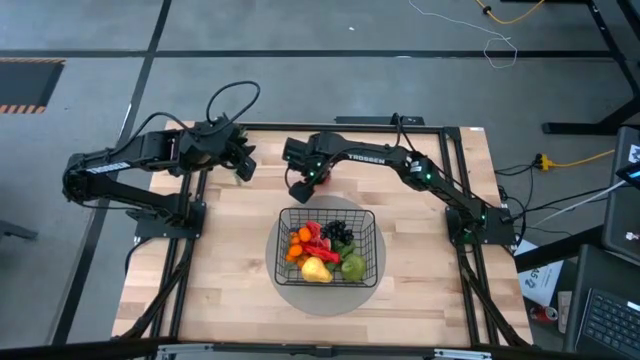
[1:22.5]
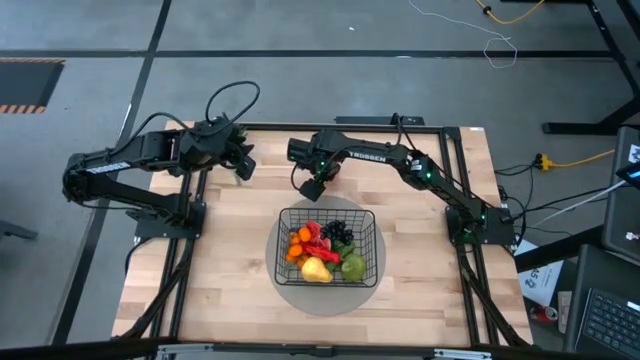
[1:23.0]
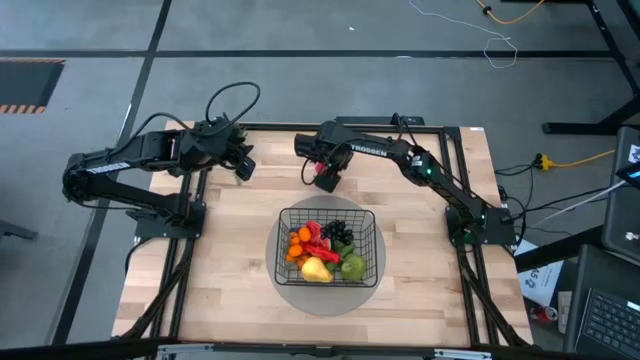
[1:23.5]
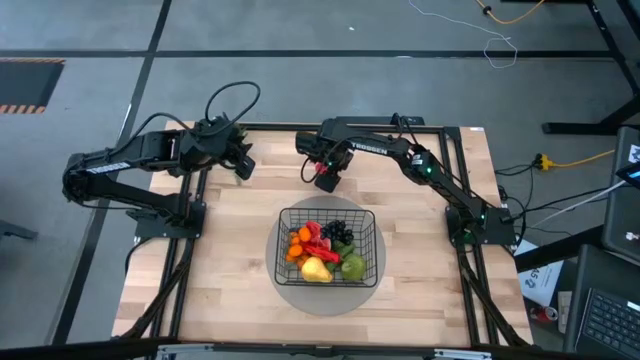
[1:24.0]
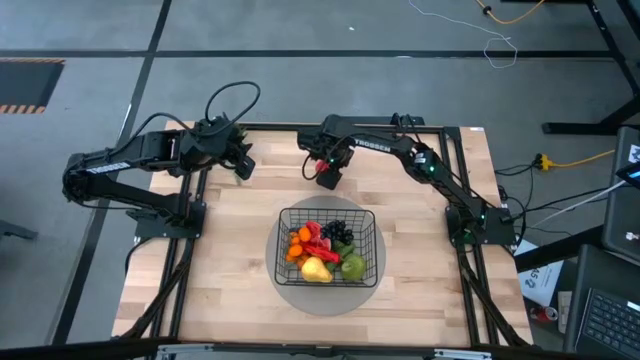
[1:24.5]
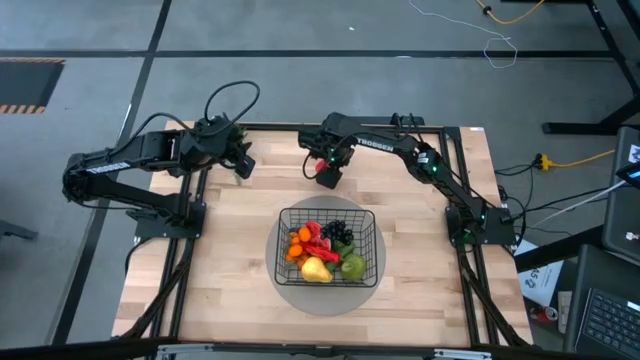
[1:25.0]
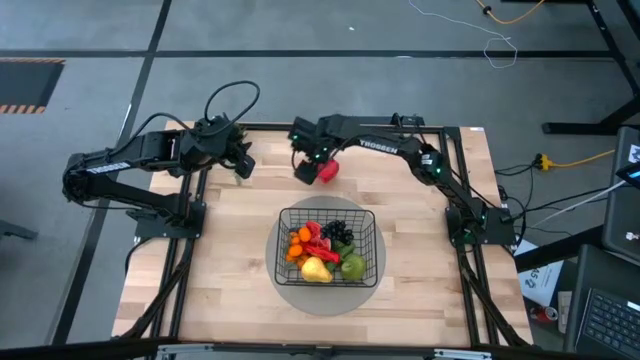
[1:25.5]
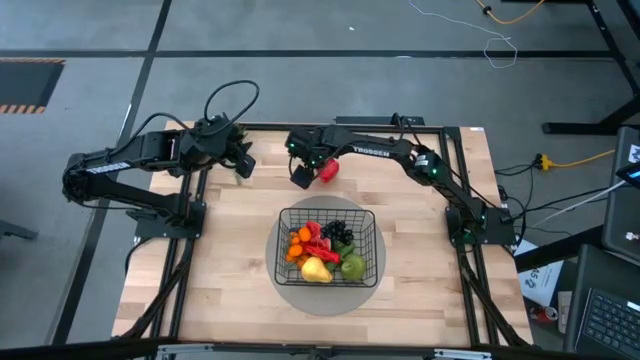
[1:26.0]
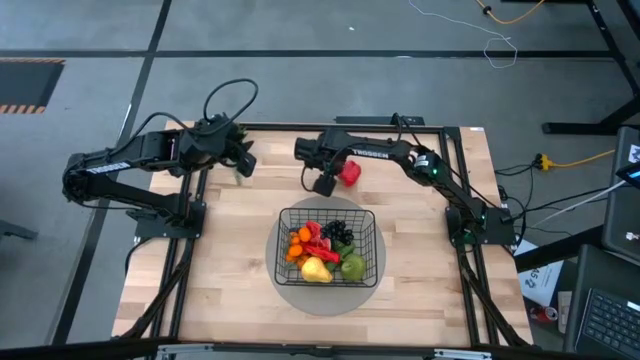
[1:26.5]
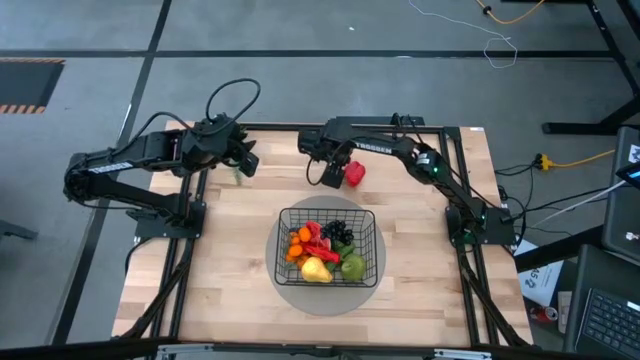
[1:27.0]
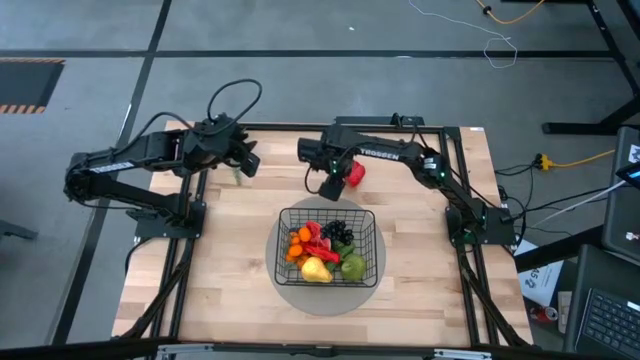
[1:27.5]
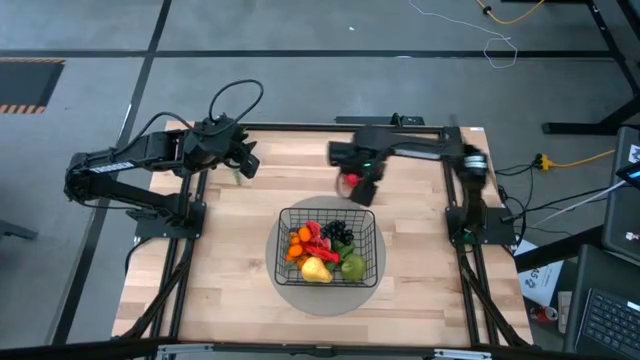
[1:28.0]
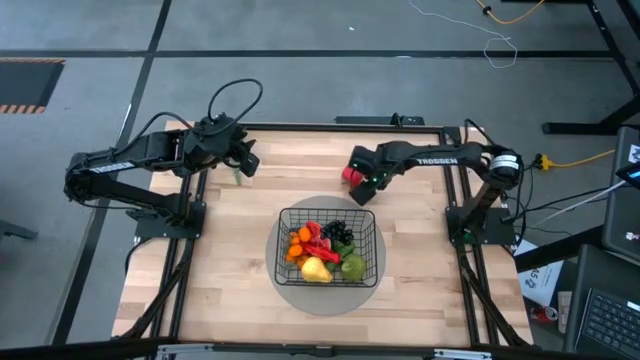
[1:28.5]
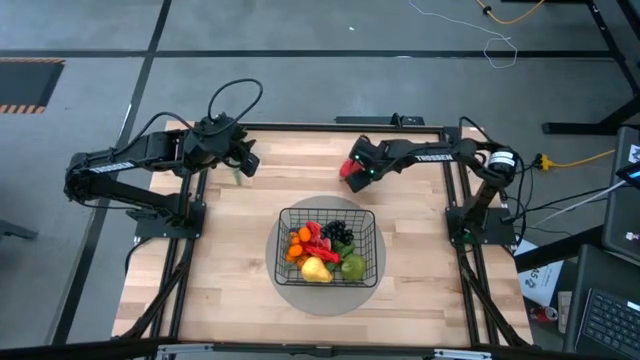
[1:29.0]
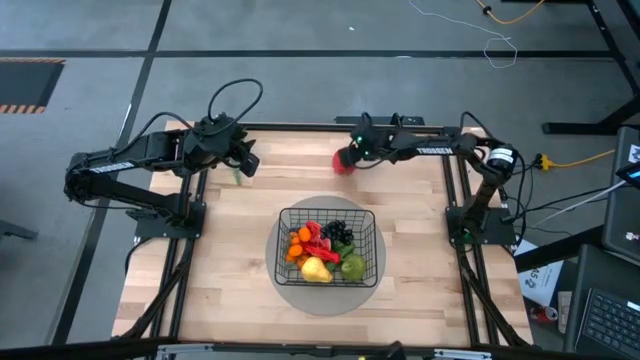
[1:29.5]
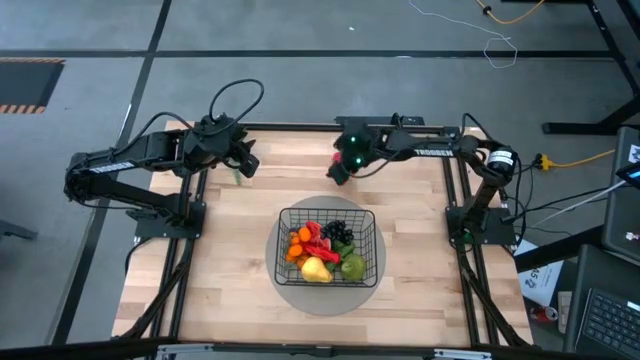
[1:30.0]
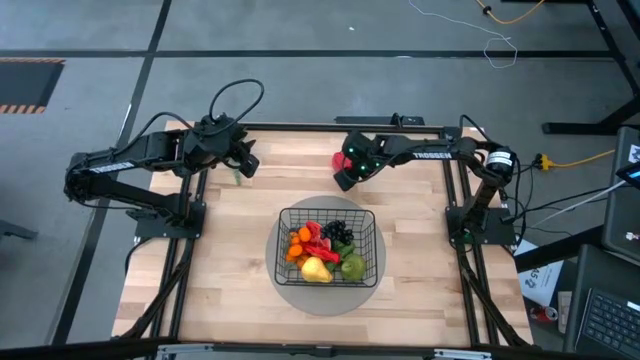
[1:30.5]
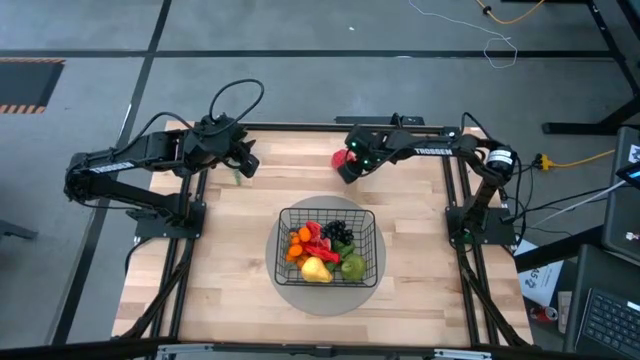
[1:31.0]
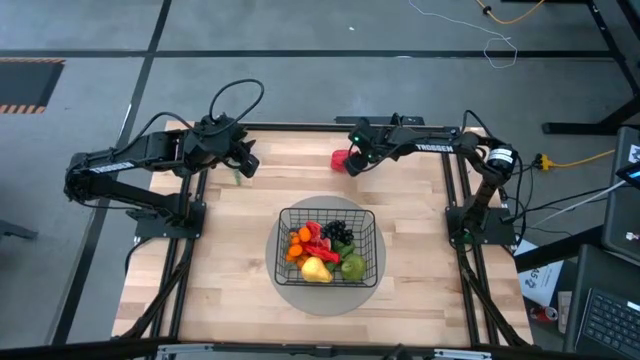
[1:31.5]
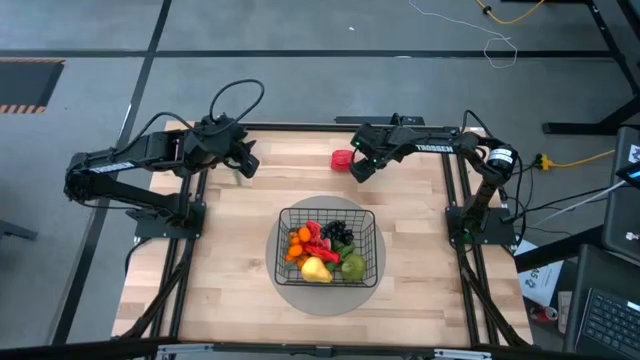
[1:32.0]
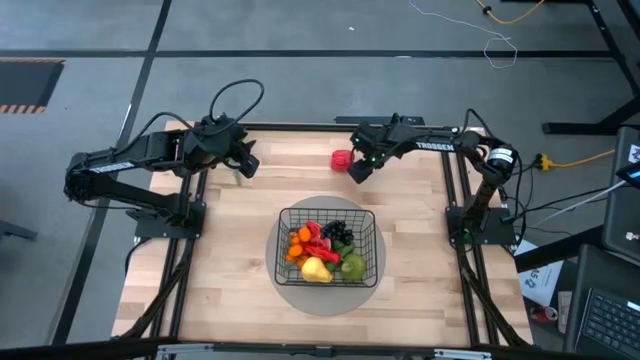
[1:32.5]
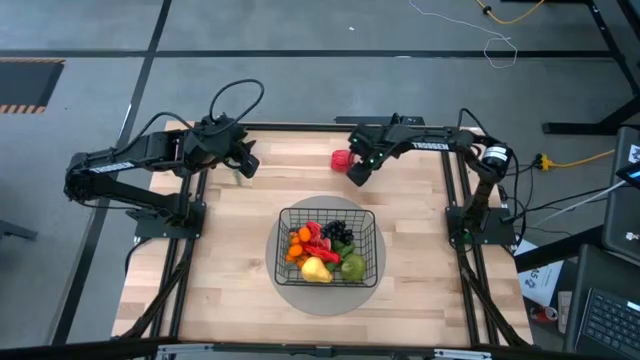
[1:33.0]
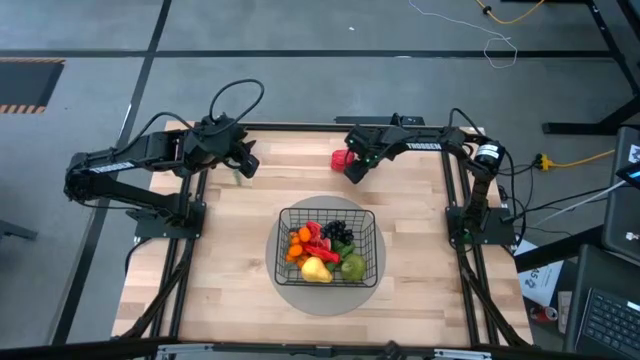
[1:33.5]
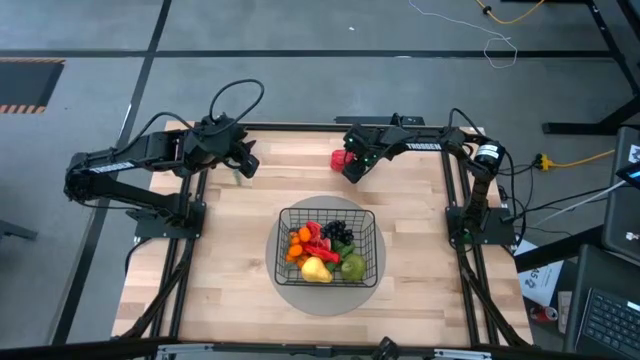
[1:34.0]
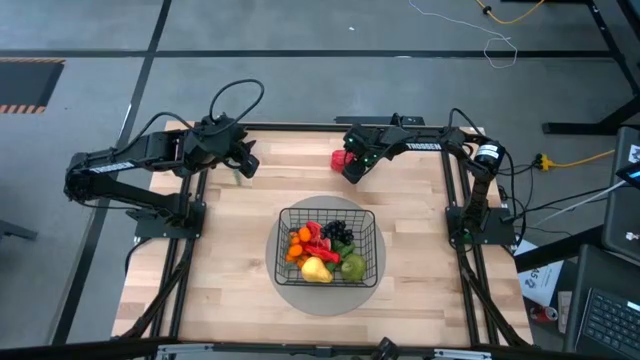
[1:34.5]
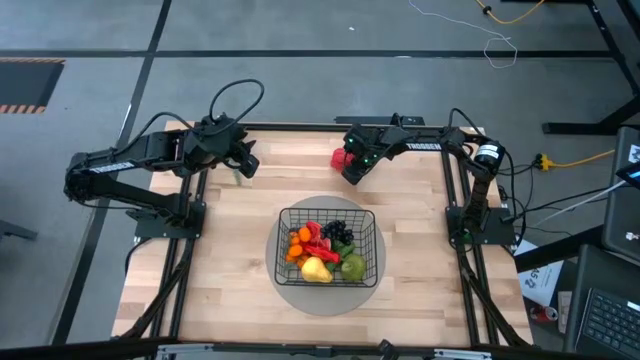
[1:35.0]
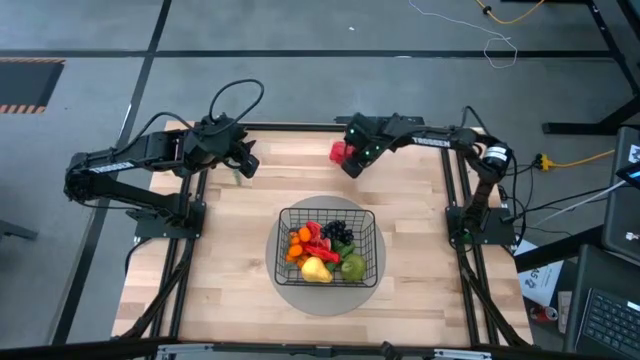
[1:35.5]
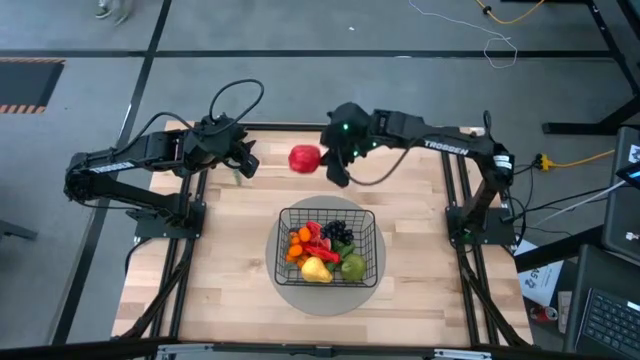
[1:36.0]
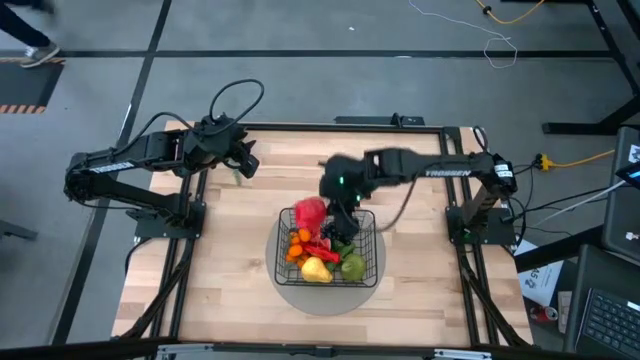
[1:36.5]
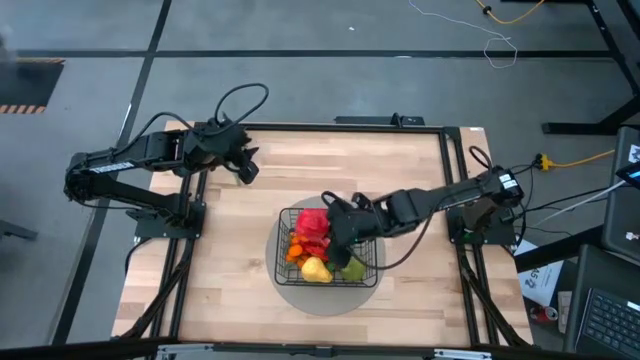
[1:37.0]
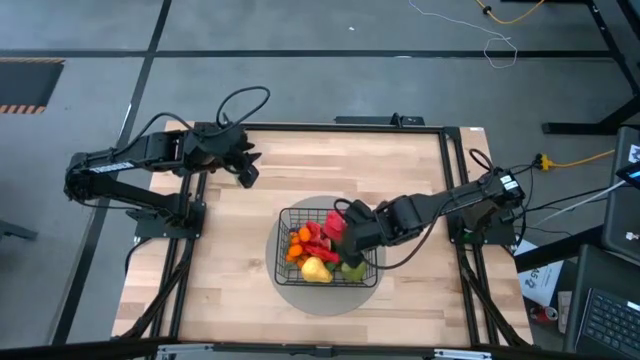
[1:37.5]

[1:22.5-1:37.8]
Task: Build produce basket
Put the red bell pepper into the black wire basket

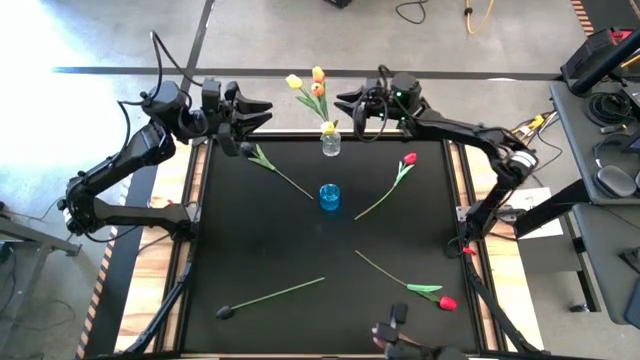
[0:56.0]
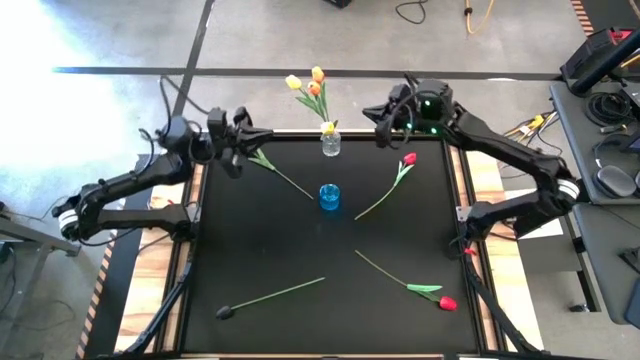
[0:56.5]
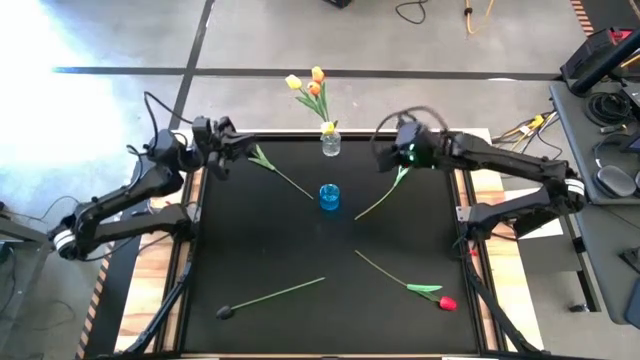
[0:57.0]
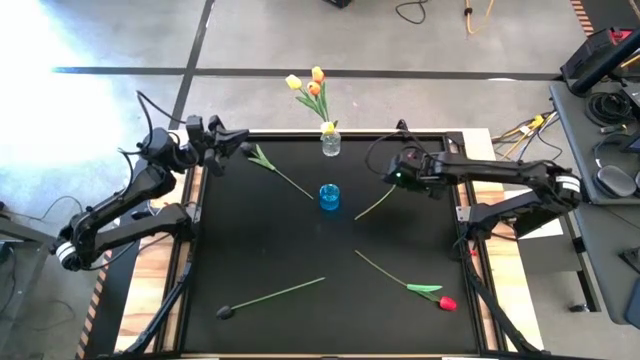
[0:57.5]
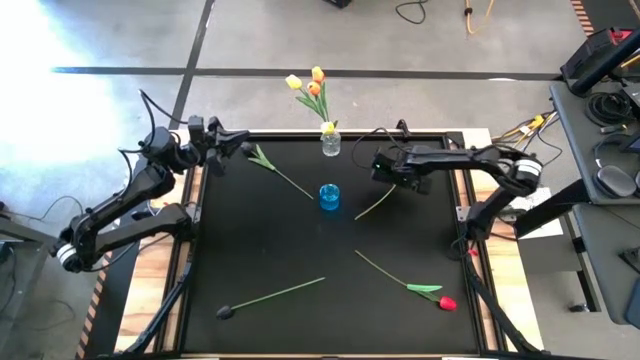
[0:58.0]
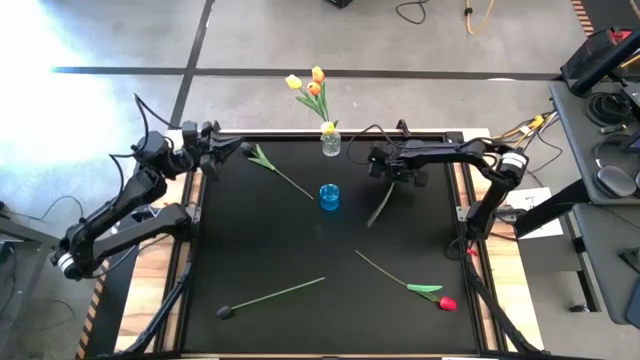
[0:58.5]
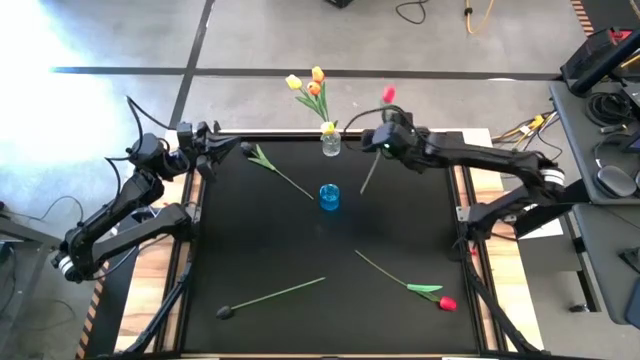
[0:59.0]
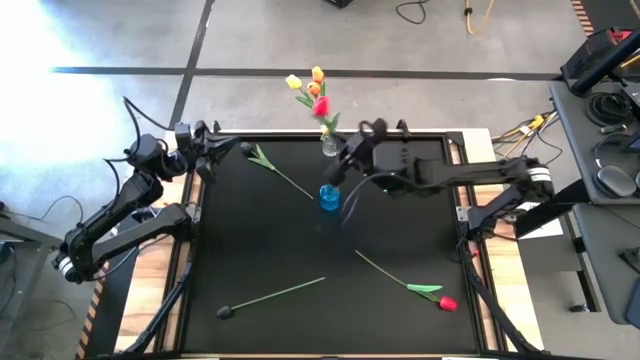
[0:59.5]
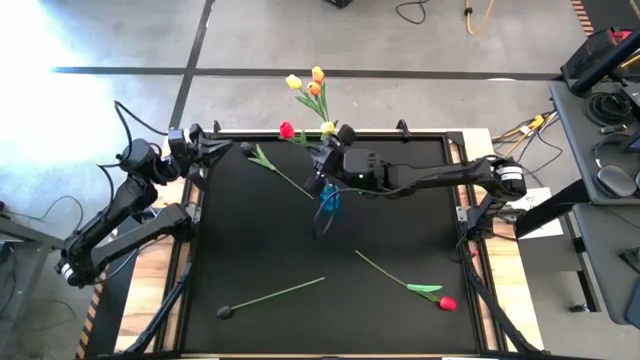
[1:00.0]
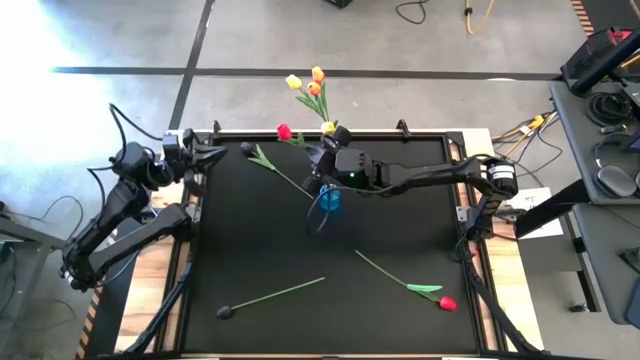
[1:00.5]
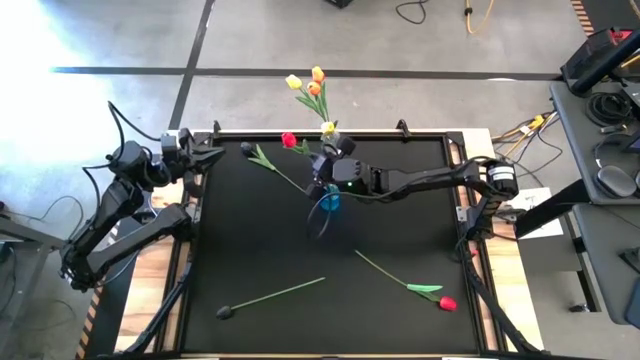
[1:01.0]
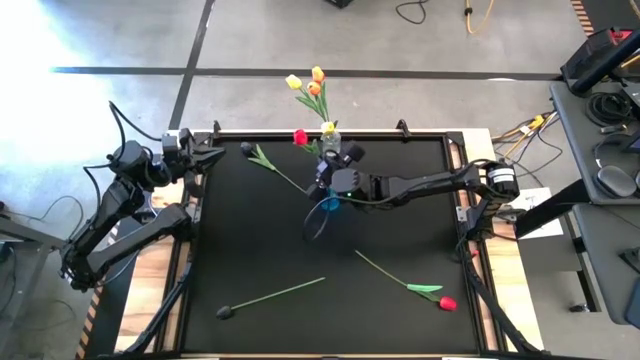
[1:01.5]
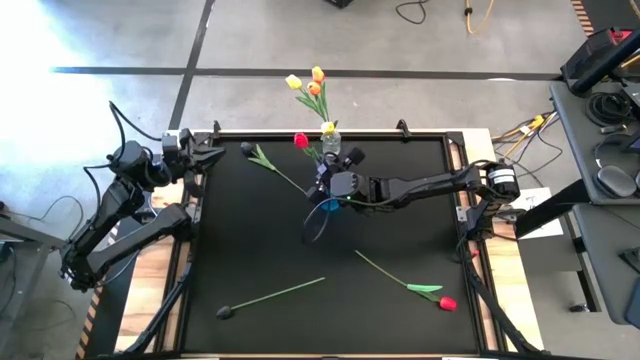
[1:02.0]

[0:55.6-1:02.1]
Task: Sort flowers into vase by color
Put the top red tulip flower into the blue vase
